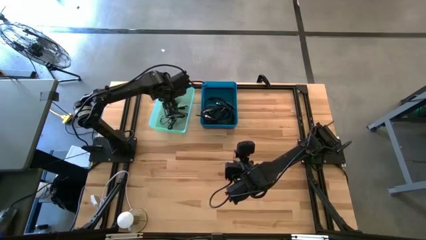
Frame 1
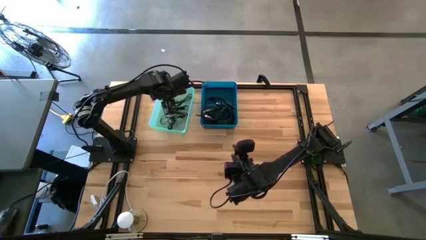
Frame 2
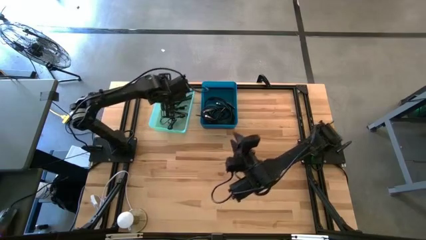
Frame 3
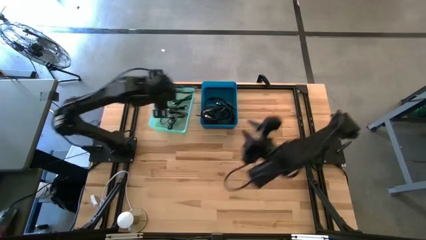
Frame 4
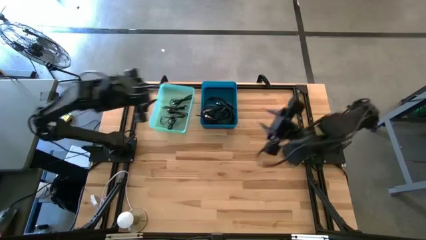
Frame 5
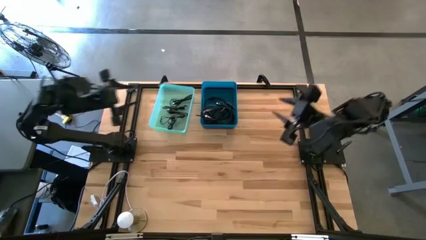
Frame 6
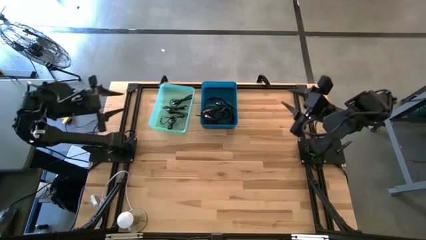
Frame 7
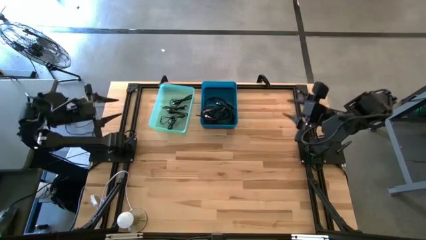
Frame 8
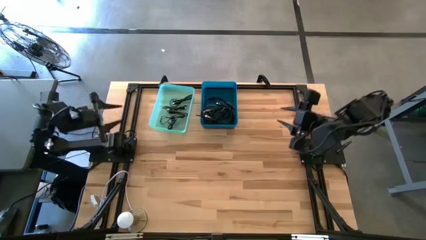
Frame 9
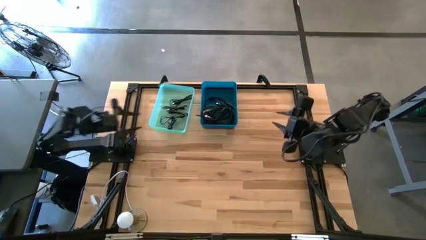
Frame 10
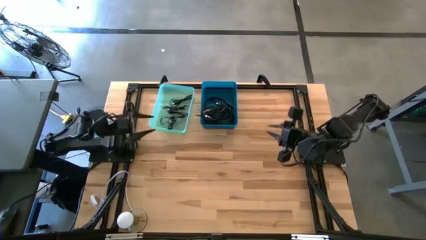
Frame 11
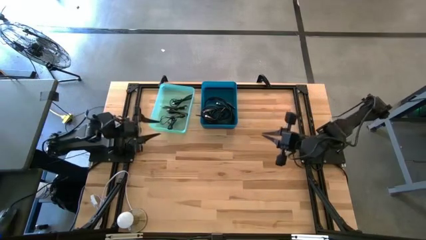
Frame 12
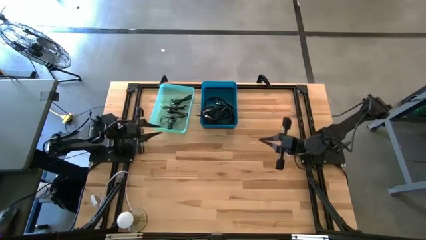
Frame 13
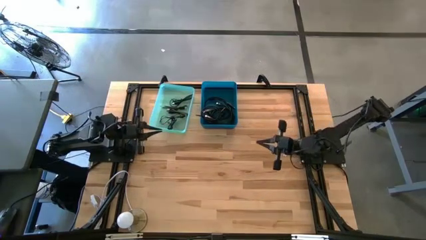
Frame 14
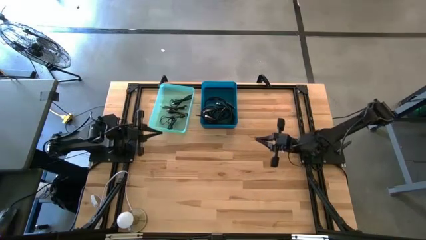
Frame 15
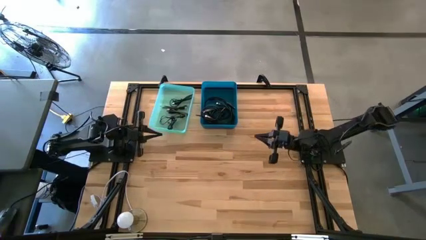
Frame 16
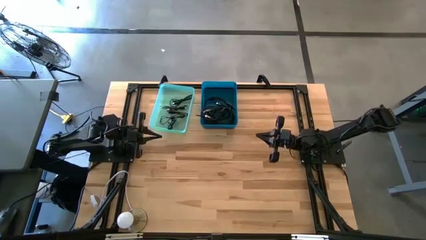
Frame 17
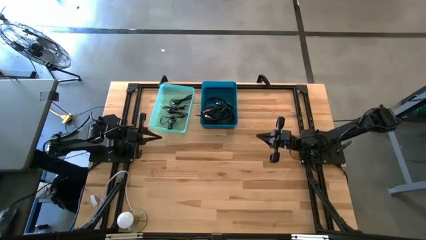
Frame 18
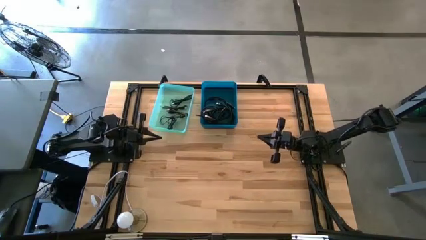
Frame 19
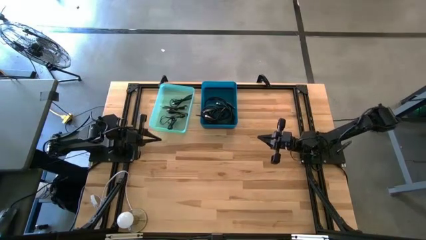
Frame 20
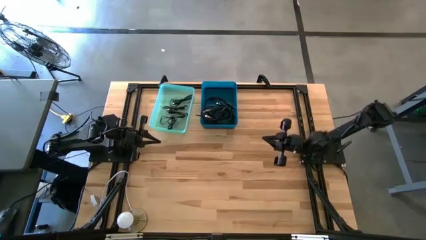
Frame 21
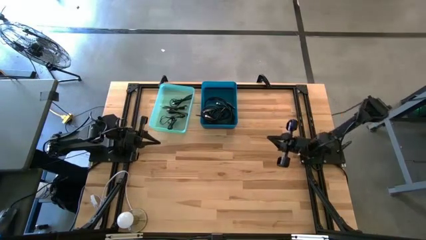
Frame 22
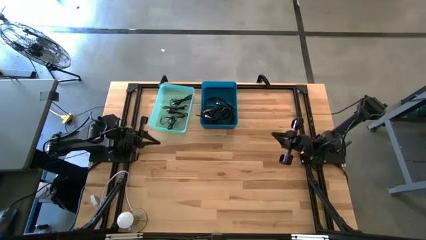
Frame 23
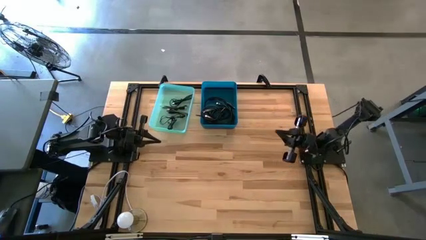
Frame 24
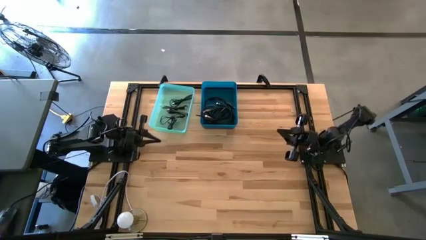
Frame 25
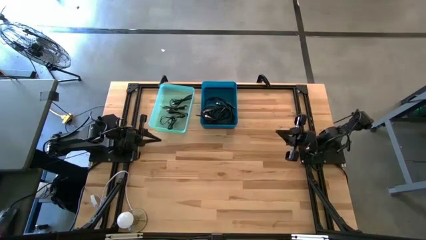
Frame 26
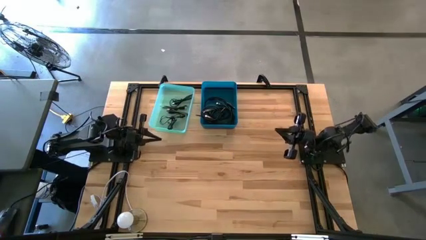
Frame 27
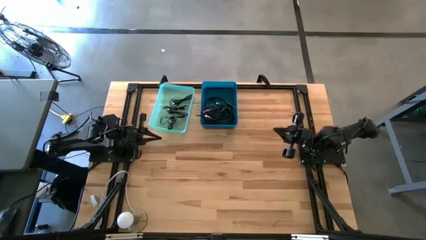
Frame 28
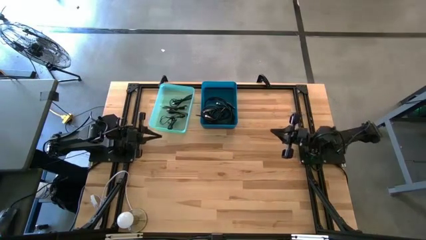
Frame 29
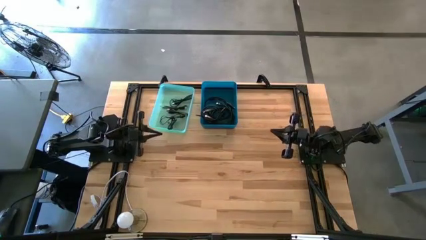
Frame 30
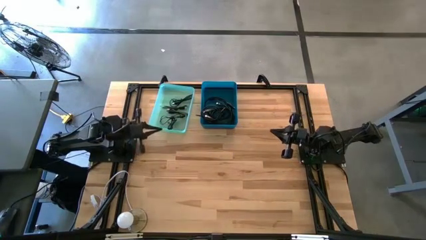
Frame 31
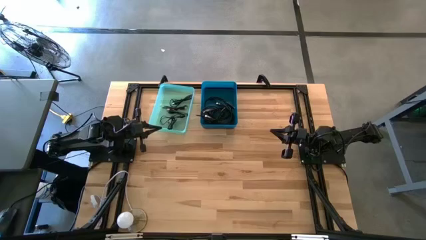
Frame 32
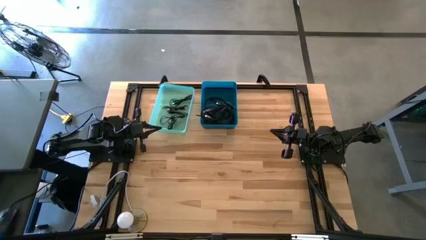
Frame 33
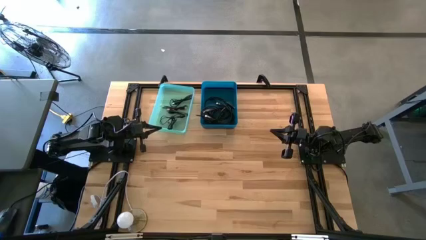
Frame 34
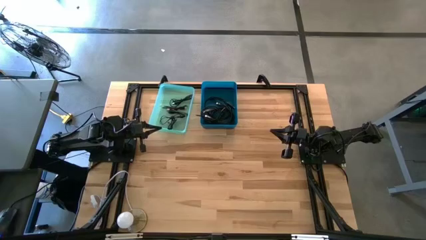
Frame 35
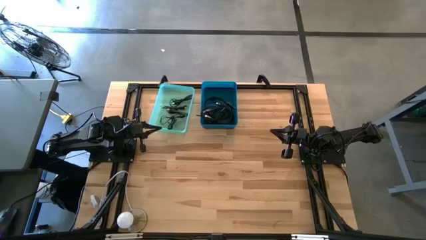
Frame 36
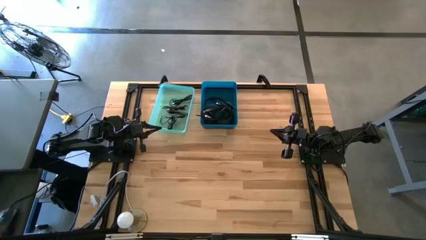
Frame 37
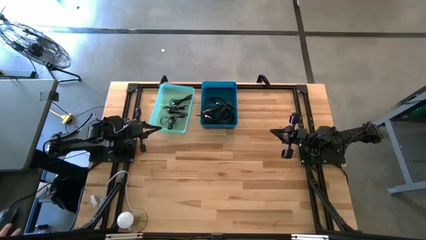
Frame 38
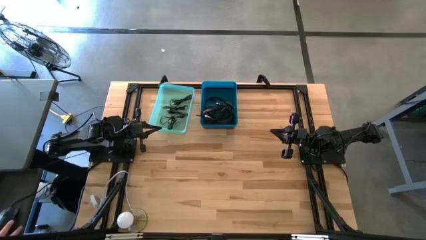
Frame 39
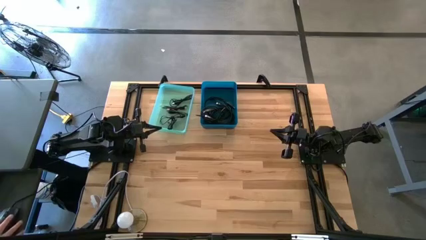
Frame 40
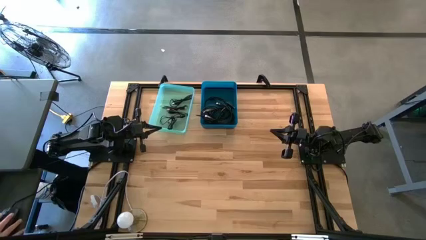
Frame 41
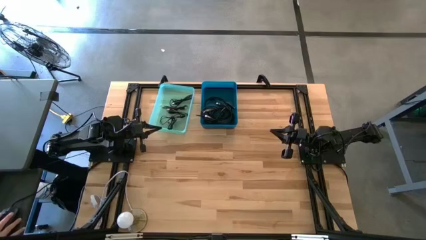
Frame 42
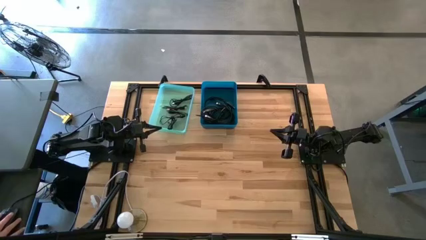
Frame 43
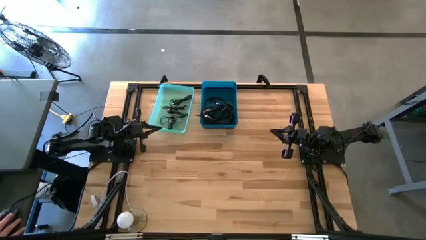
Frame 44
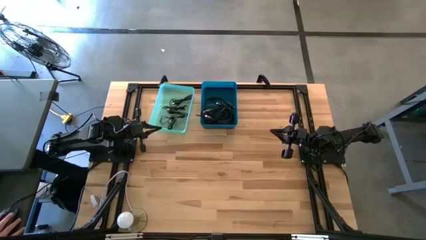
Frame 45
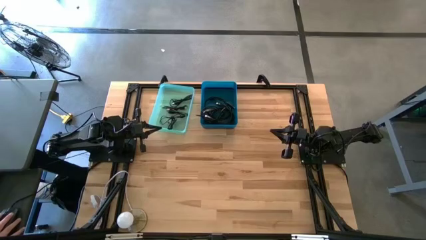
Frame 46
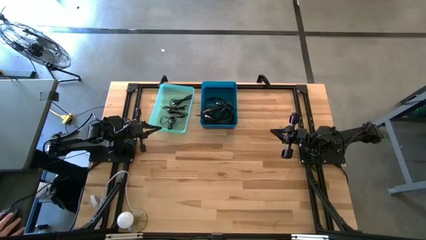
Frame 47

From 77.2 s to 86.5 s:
Task: Pick & Place USB Port
Return to Home Position

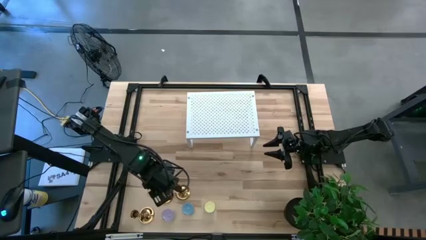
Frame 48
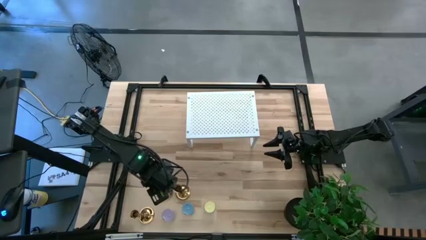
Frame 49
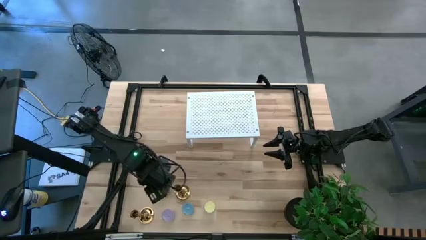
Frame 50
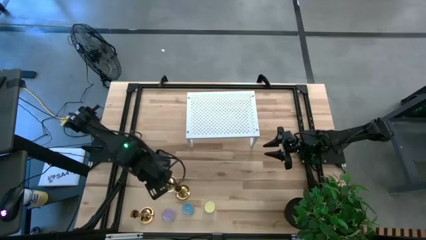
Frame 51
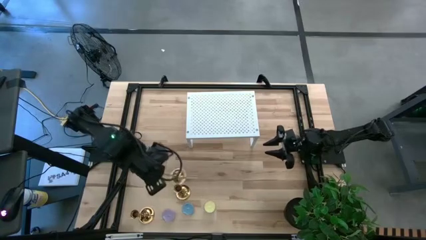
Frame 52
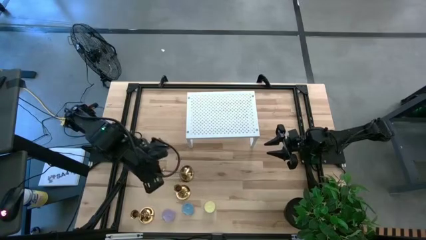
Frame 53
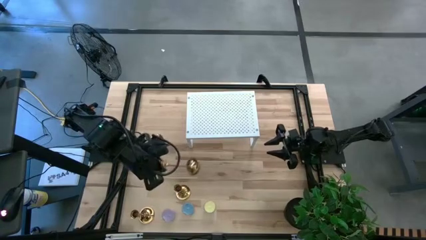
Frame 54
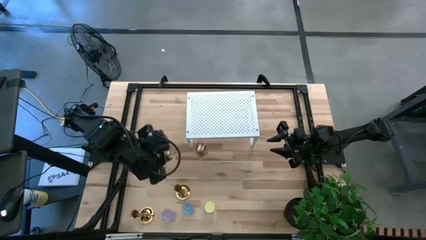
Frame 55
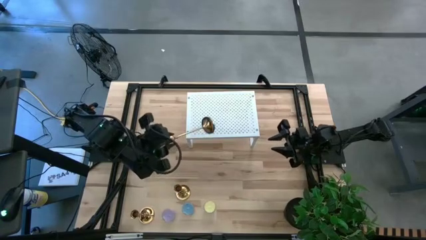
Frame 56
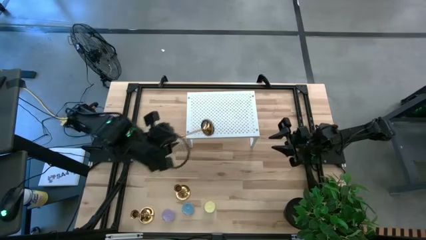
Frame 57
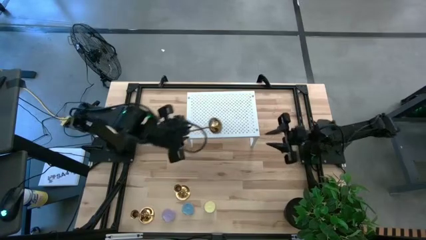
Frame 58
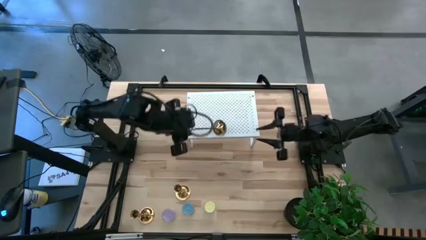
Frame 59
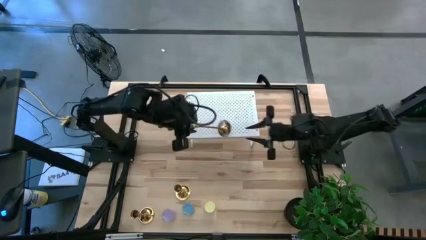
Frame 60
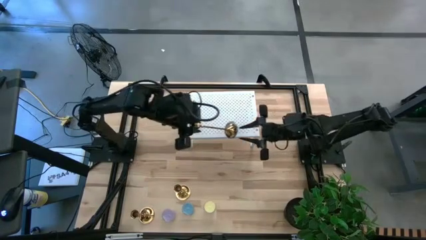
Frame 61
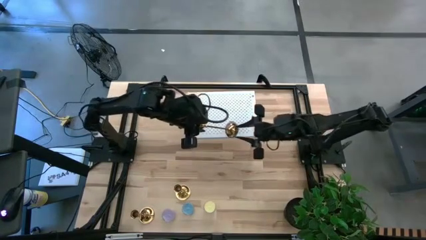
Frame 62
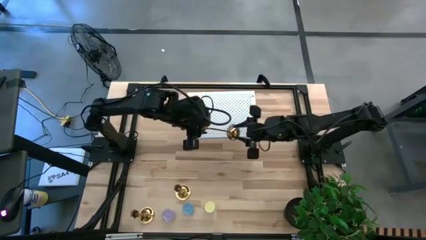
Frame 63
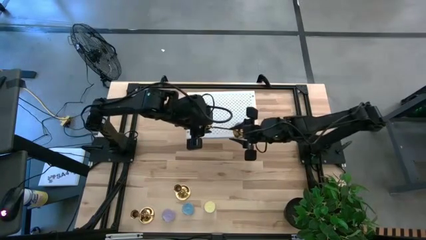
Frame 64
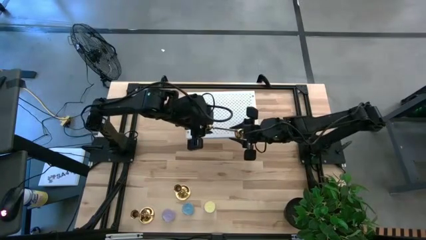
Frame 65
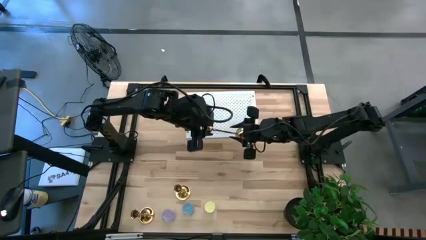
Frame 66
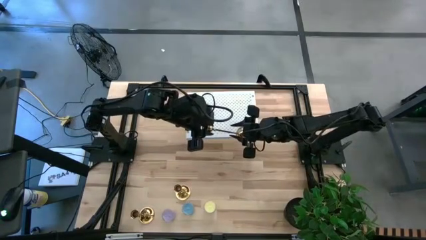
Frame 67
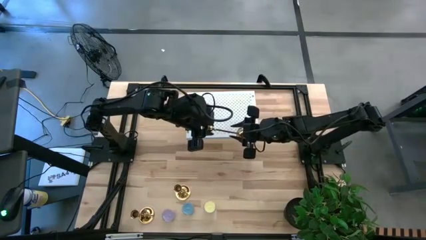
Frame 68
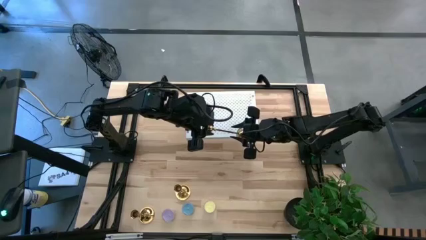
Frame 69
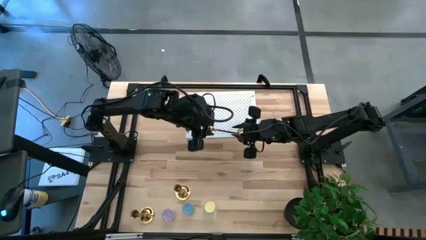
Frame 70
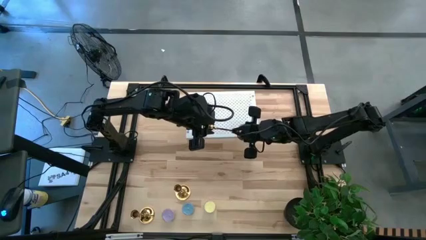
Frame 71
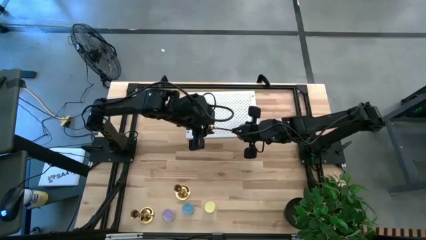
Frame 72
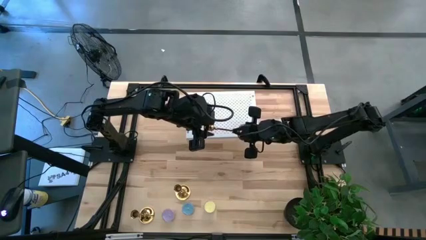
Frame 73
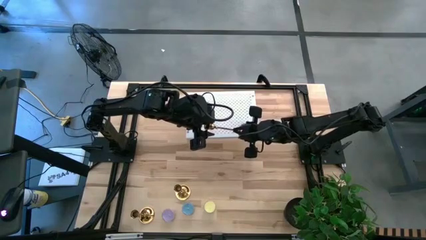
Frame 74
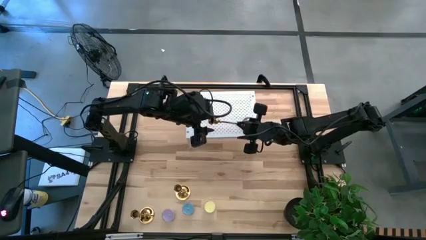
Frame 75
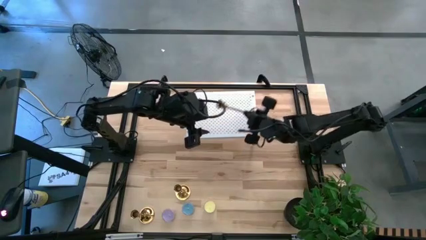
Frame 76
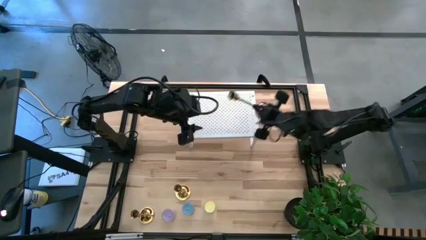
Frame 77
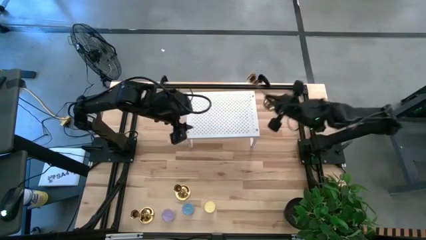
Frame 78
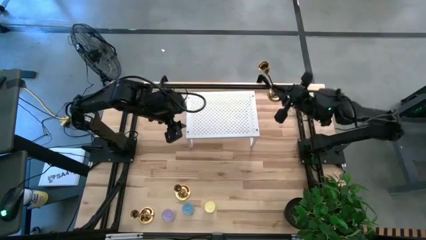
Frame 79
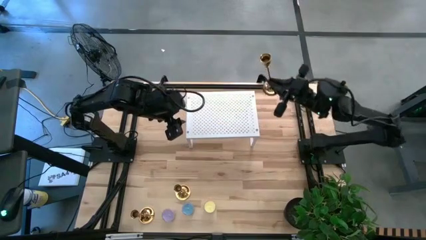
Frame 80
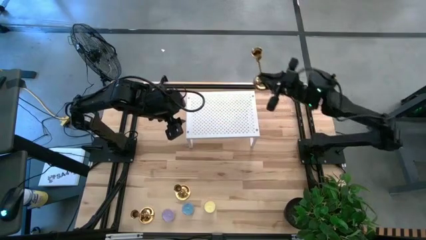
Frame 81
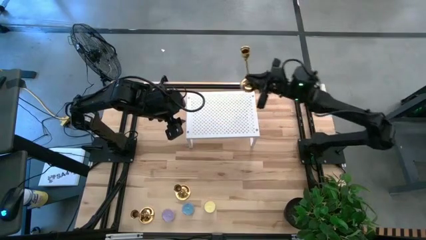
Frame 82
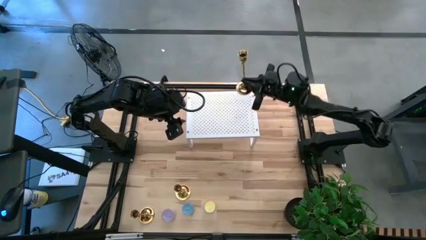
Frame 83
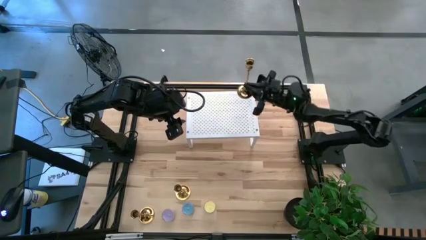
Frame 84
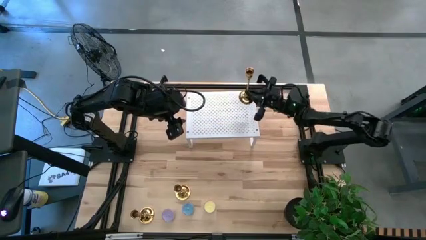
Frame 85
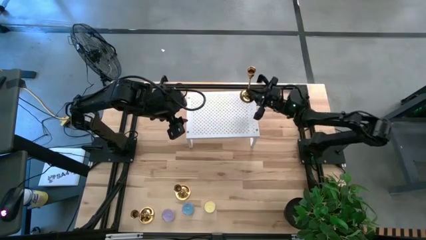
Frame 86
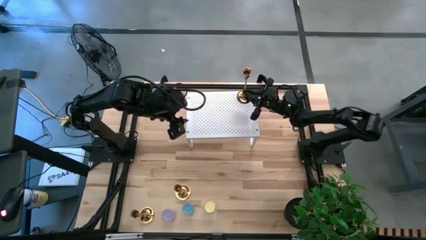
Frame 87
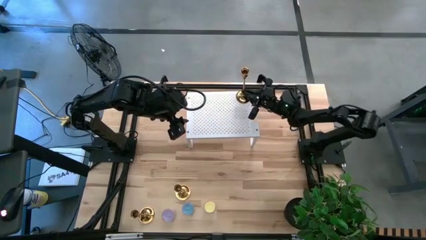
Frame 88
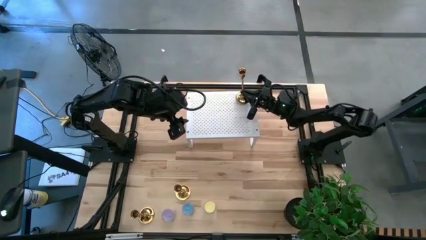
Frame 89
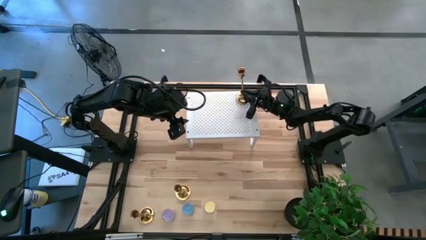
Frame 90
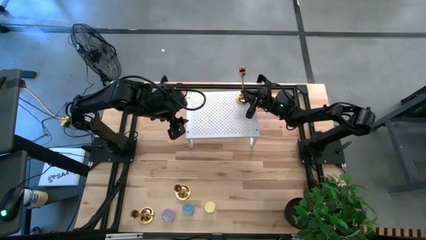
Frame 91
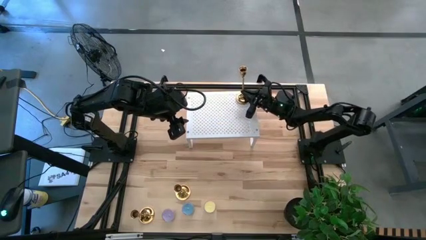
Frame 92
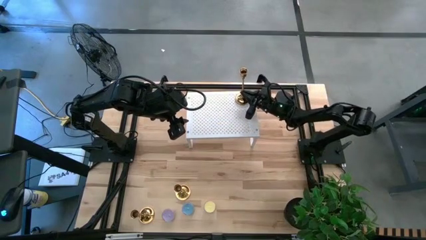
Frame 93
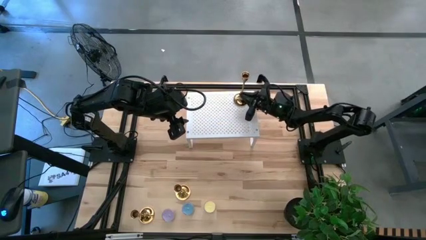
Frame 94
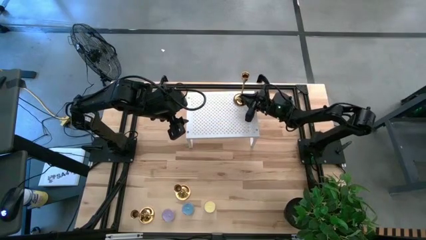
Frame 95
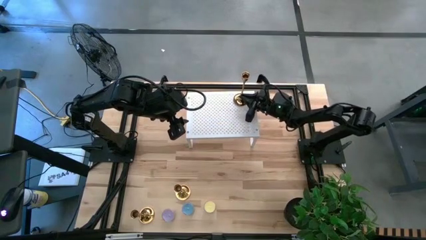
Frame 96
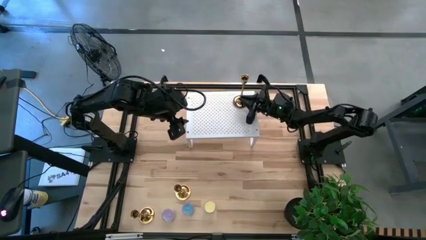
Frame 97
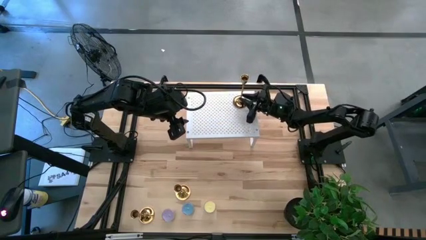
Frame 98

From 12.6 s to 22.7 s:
Task: Pick & Place candle stick holders
Put the middle gold candle holder on the shelf
